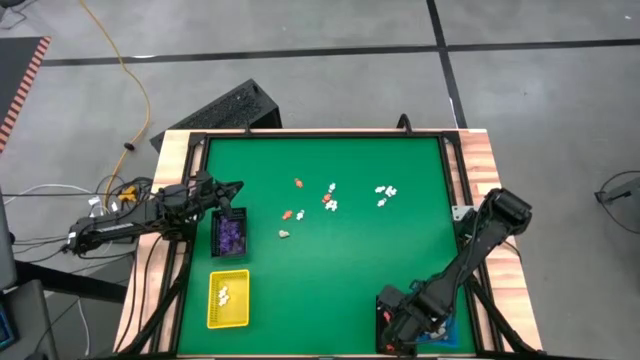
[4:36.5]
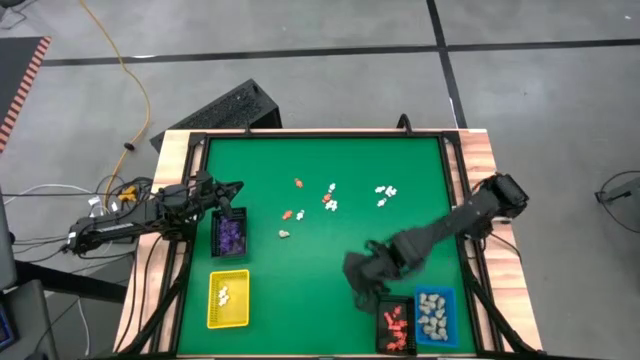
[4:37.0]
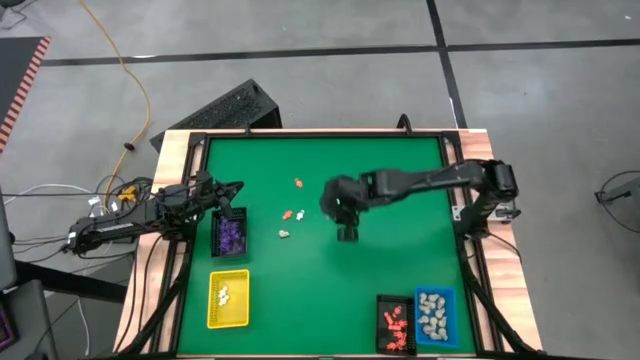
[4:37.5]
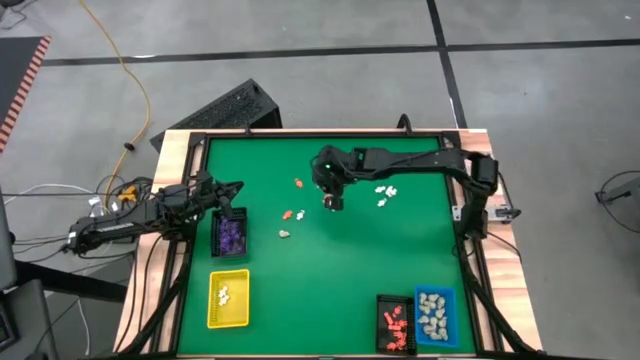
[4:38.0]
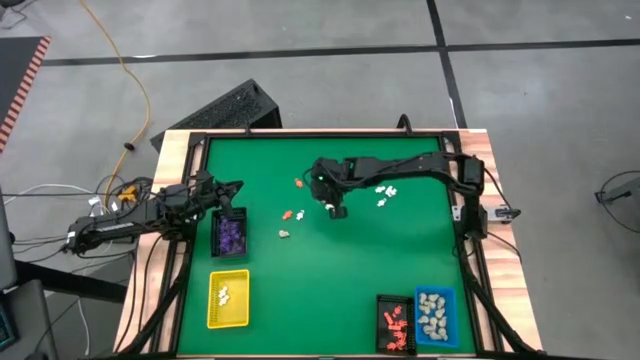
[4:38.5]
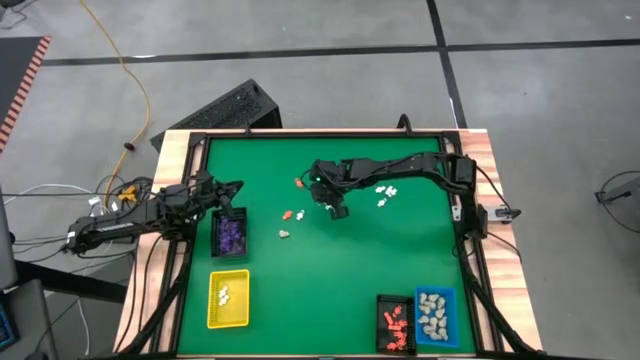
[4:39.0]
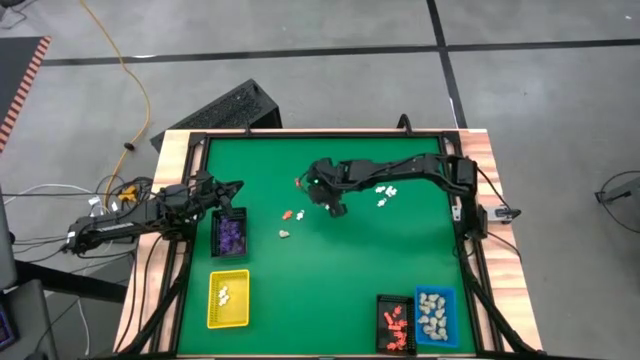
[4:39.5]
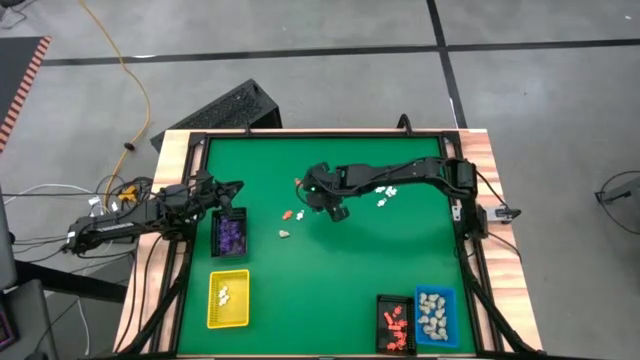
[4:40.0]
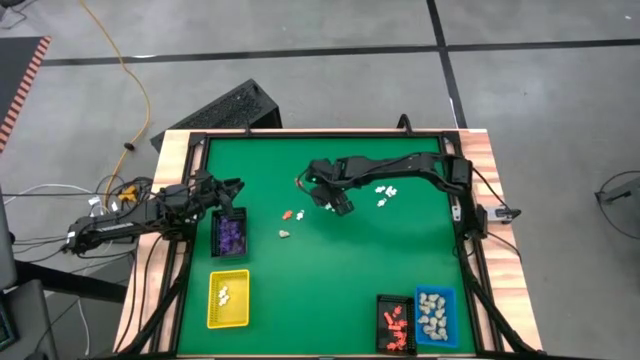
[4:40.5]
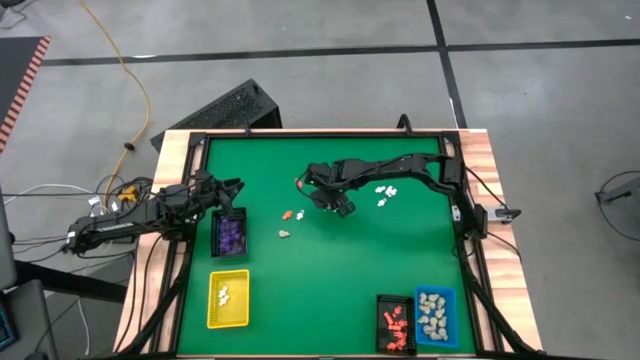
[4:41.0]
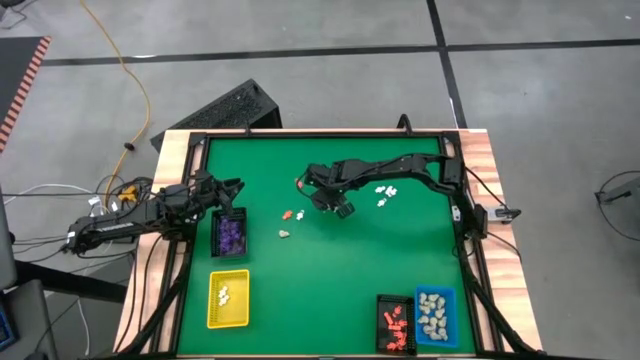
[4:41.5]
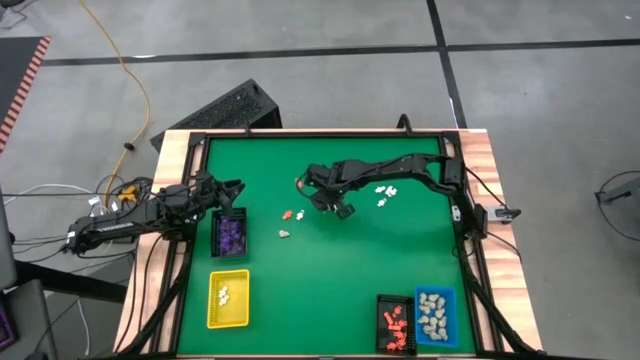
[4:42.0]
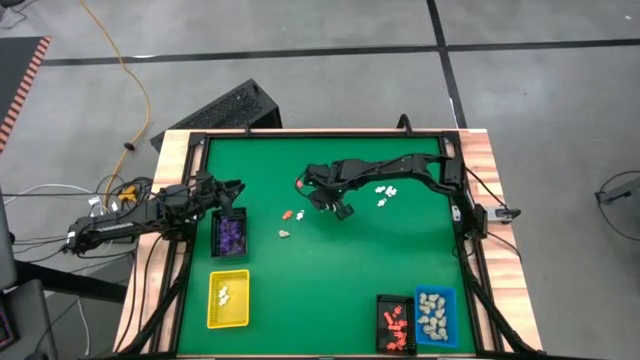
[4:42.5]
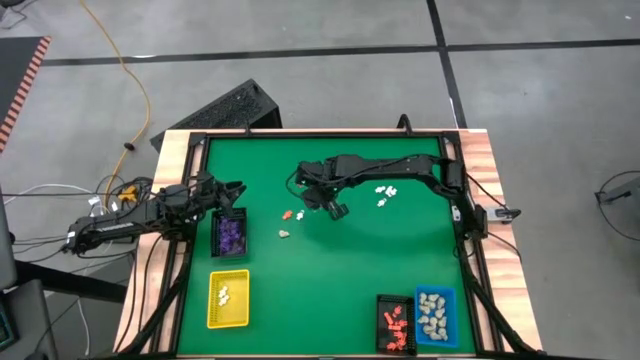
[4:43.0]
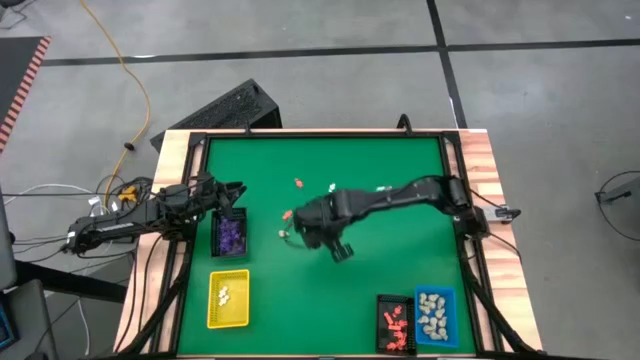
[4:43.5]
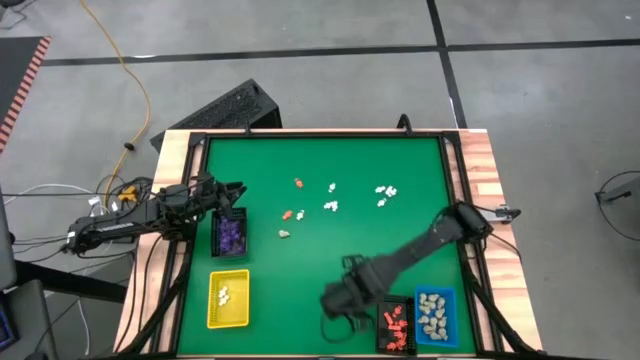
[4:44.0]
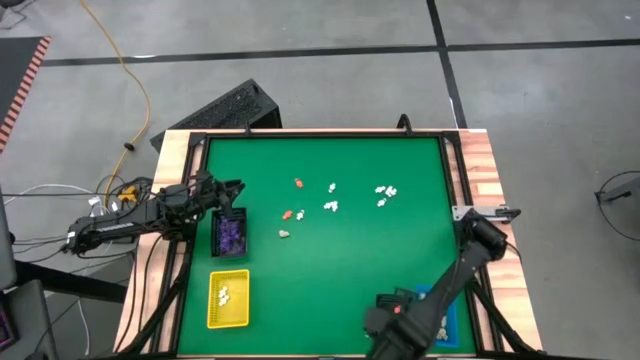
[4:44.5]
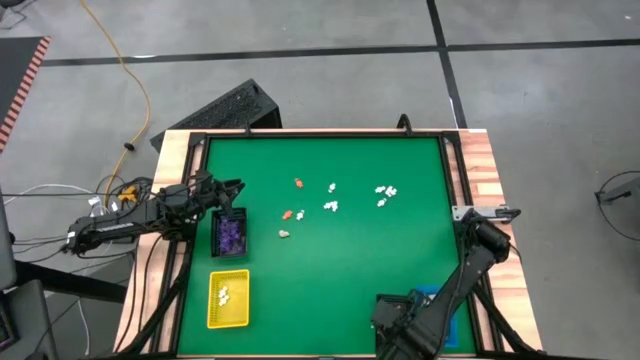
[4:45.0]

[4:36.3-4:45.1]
Task: Sort Halloween decoration
Put the orange skeleton toy into the bottom black basket

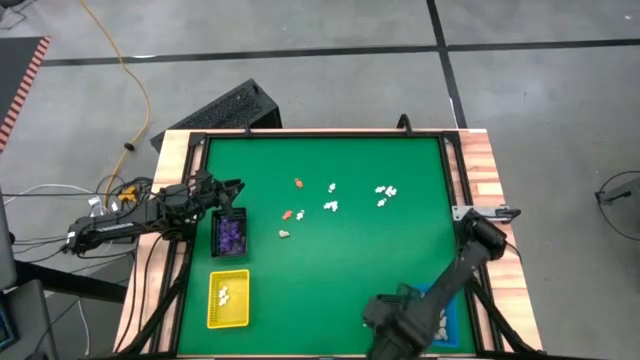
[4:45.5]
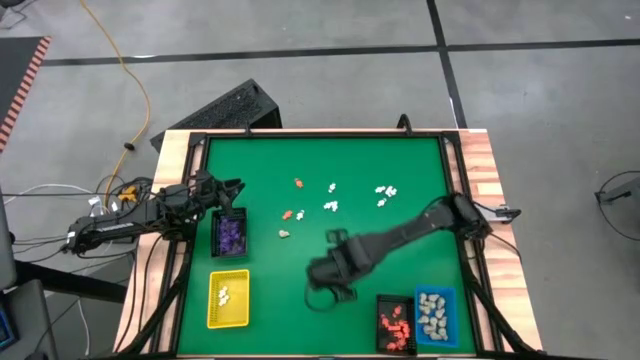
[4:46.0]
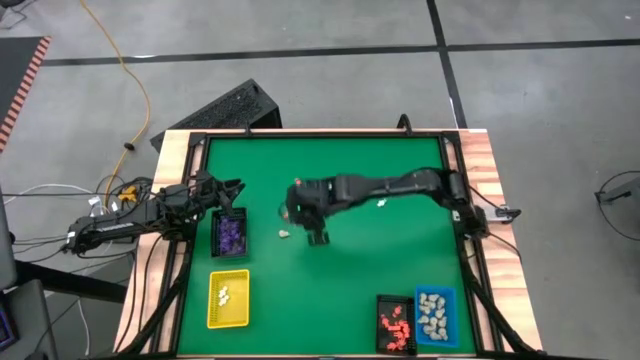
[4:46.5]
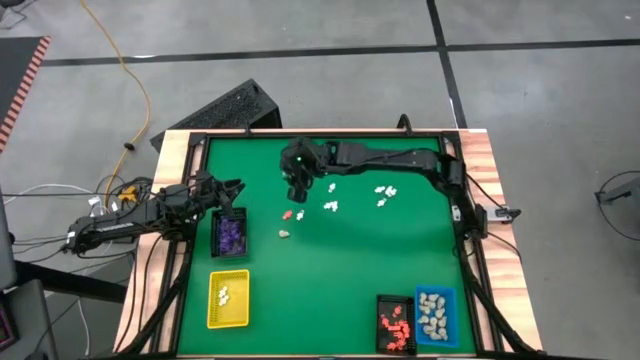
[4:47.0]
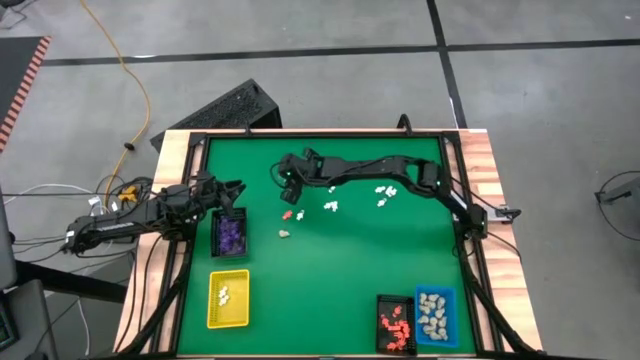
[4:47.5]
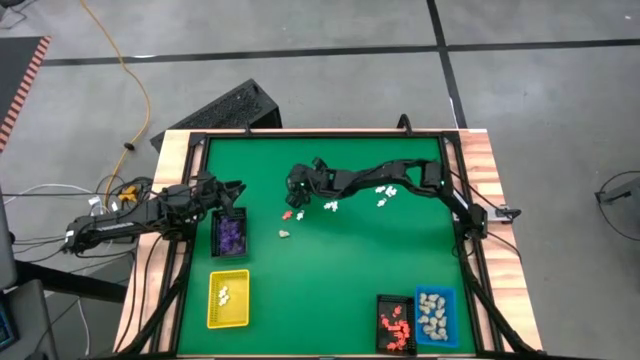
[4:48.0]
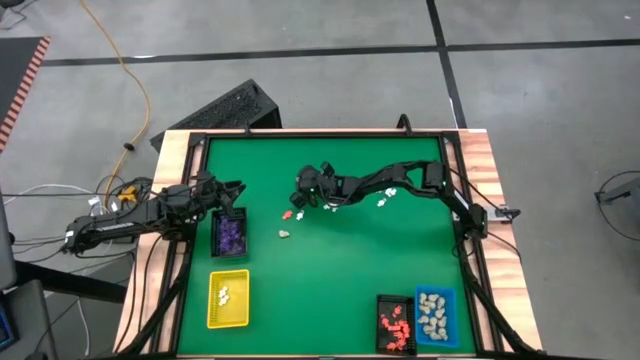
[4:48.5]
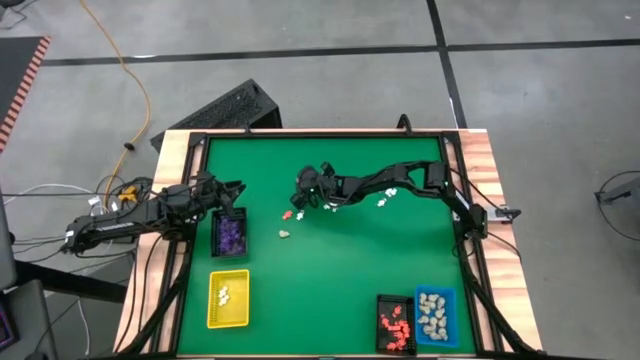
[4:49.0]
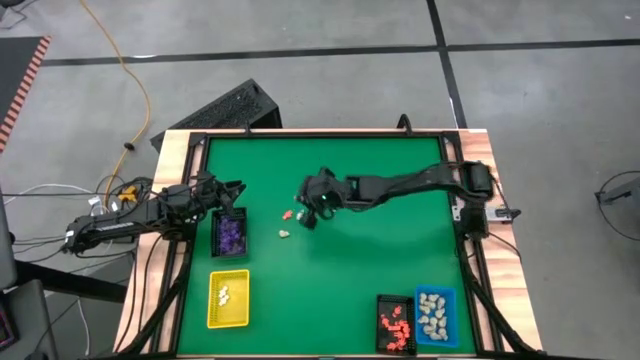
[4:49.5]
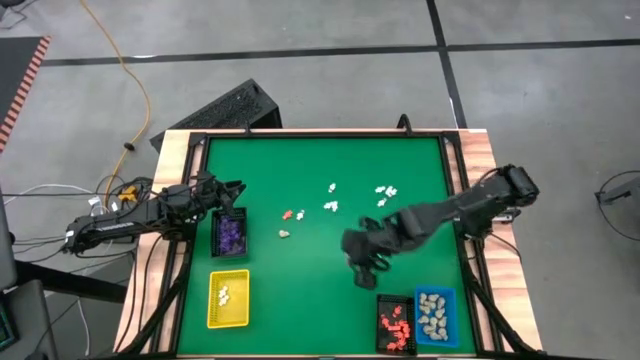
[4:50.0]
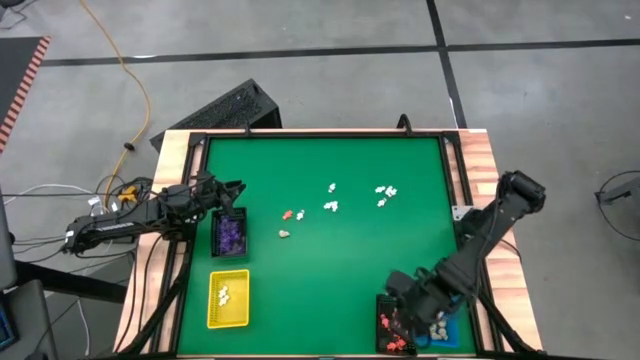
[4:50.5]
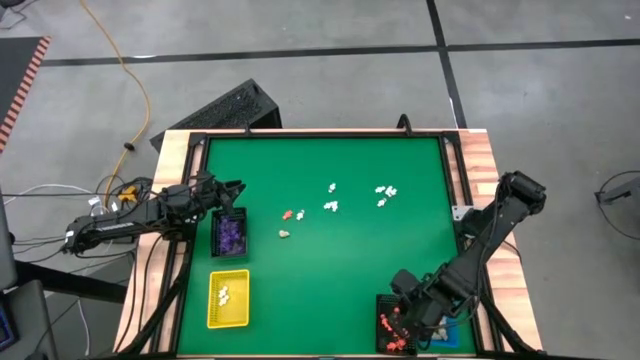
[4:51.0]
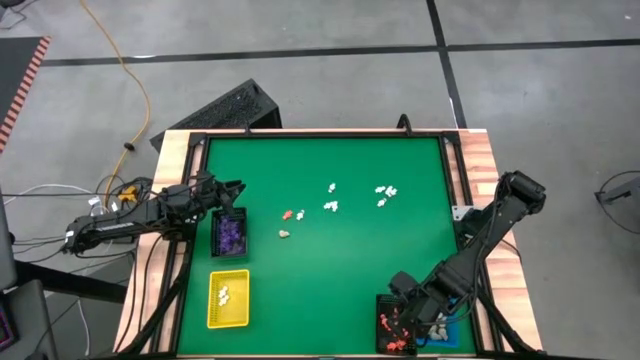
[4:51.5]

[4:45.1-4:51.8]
Put the orange skeleton toy into the bottom black basket

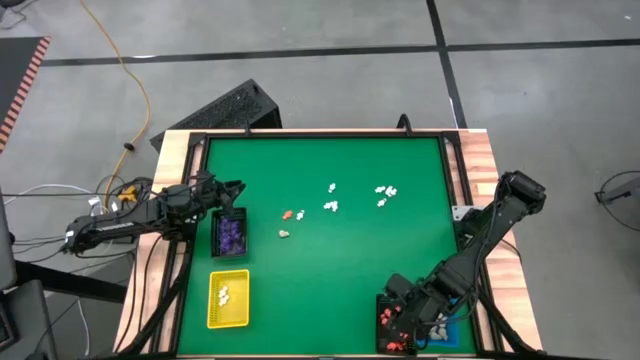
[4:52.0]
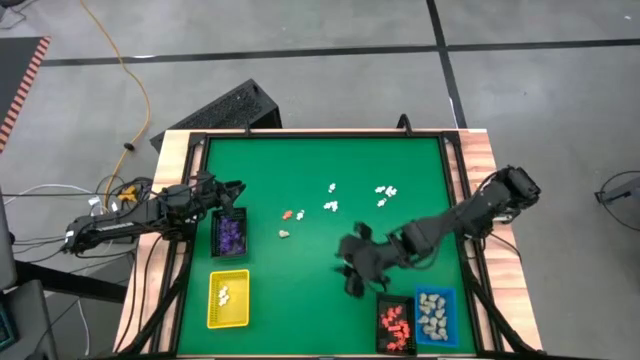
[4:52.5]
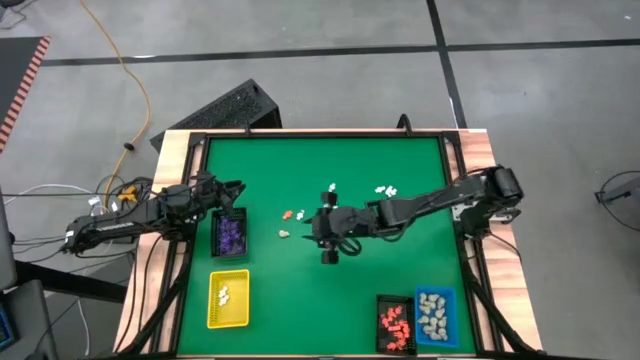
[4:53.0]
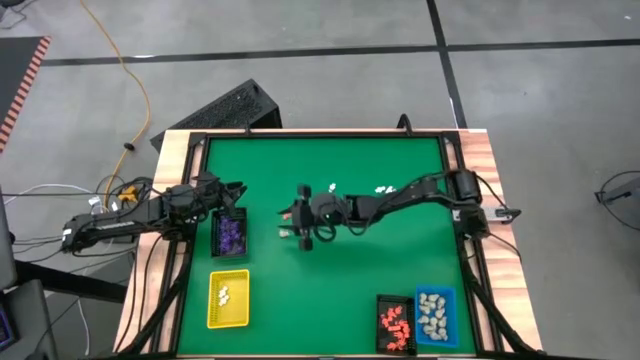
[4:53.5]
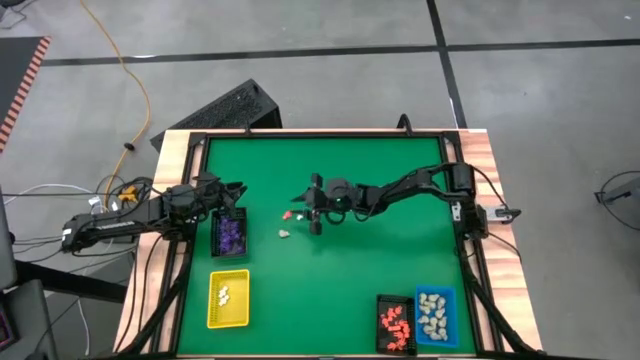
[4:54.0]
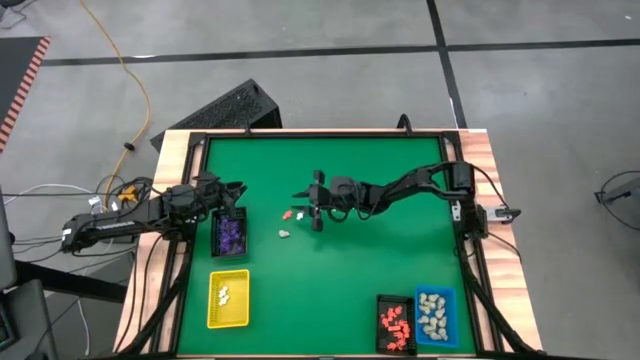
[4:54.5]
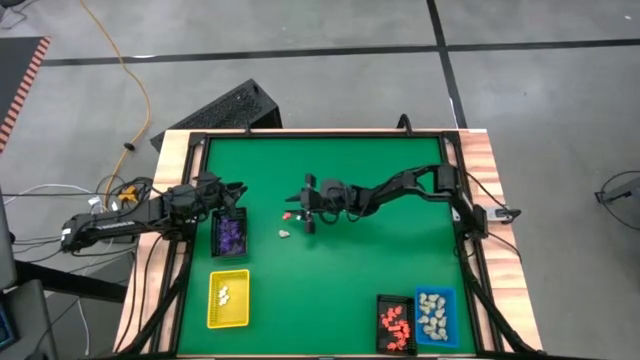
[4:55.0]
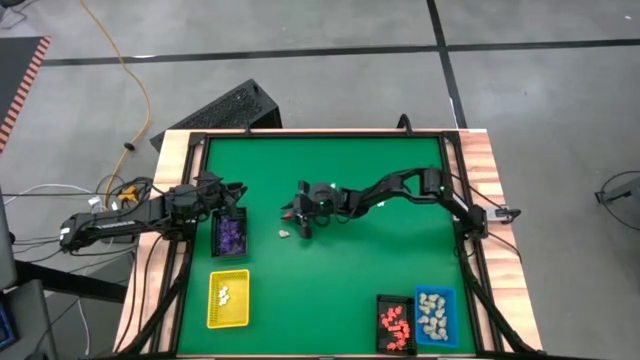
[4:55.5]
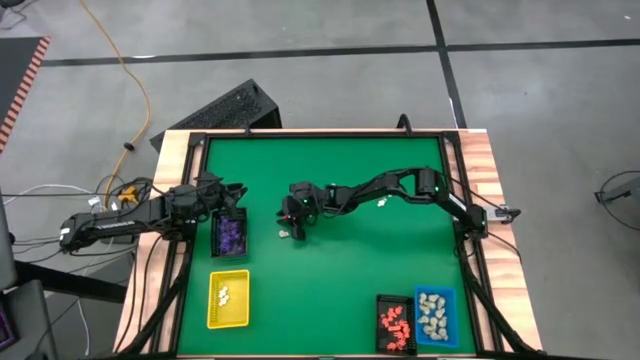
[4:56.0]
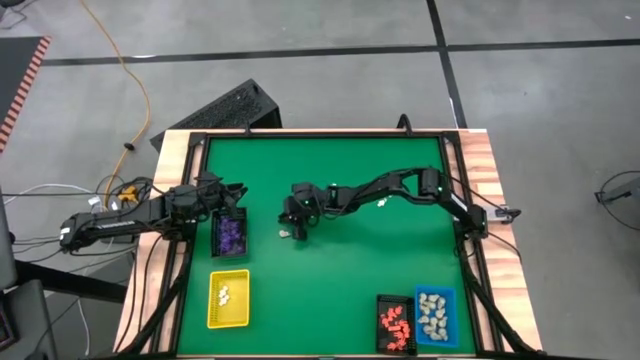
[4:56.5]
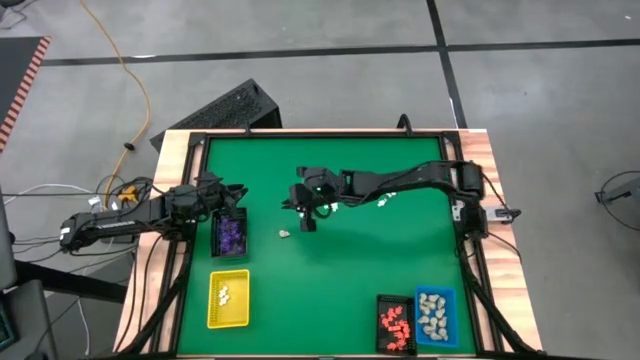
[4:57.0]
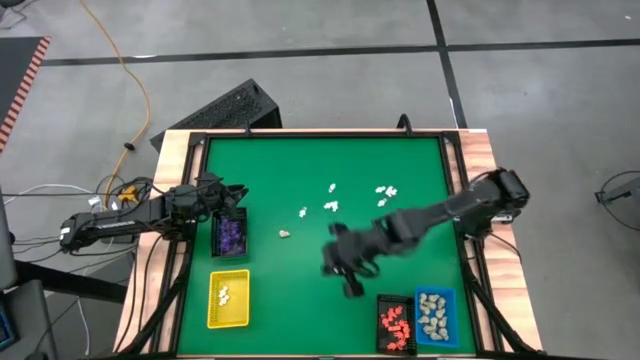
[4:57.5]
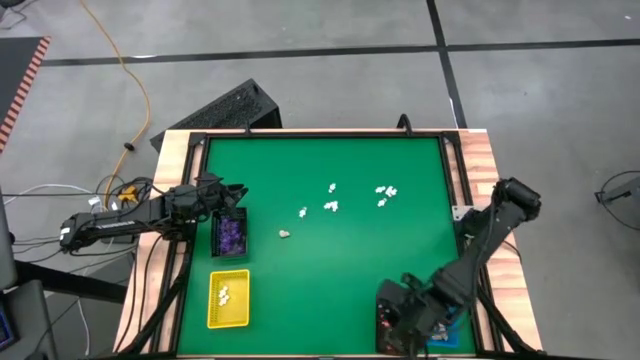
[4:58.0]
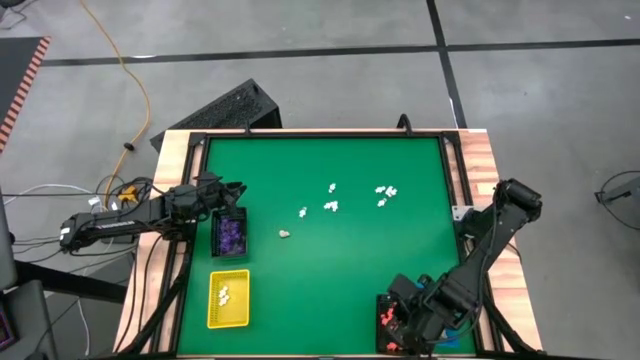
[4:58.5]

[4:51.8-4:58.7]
Put the orange skeleton toy into the bottom black basket
